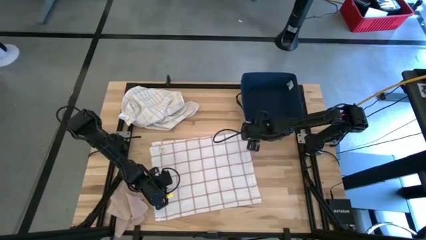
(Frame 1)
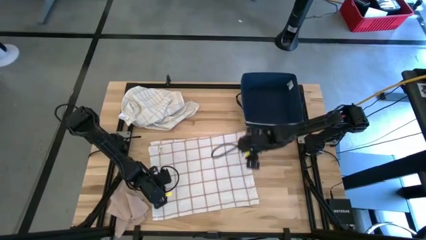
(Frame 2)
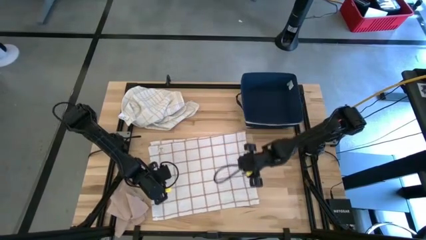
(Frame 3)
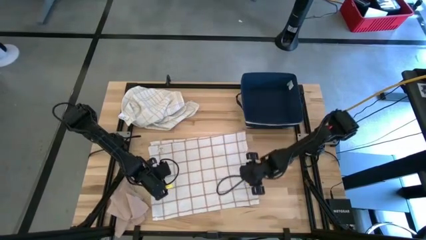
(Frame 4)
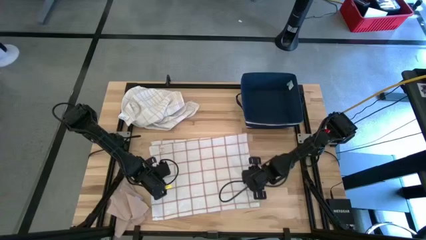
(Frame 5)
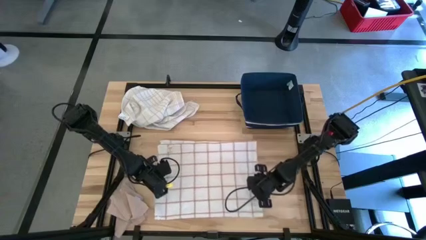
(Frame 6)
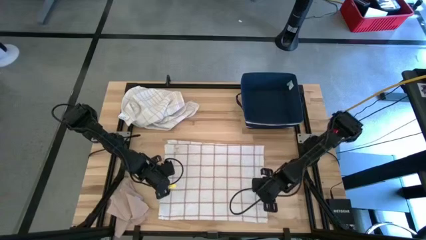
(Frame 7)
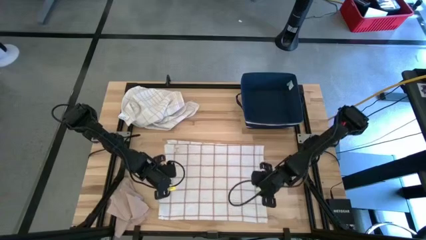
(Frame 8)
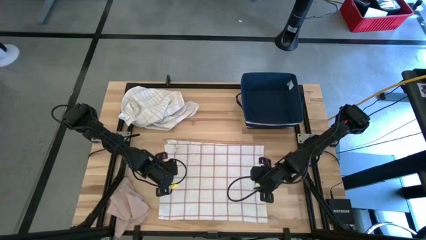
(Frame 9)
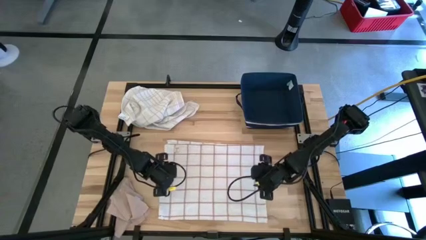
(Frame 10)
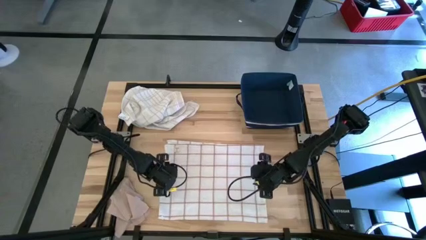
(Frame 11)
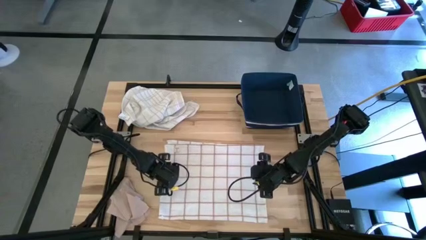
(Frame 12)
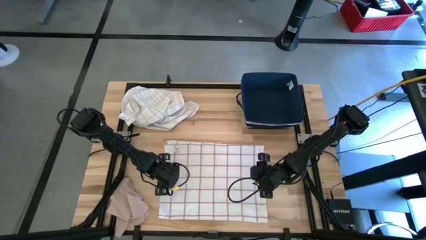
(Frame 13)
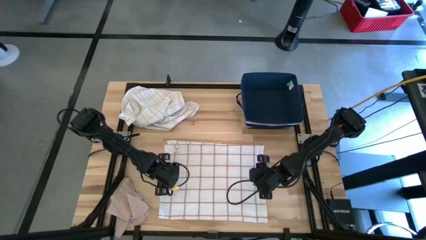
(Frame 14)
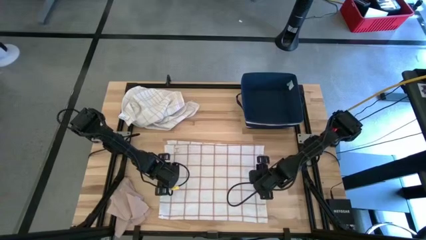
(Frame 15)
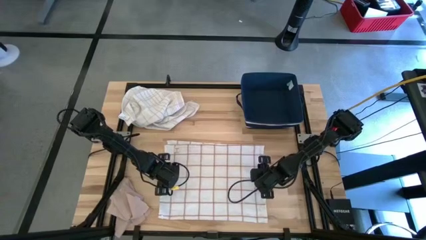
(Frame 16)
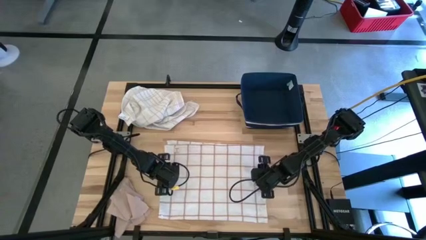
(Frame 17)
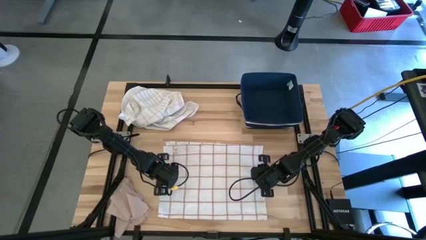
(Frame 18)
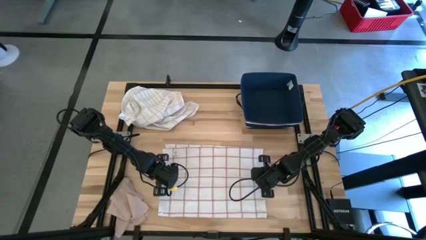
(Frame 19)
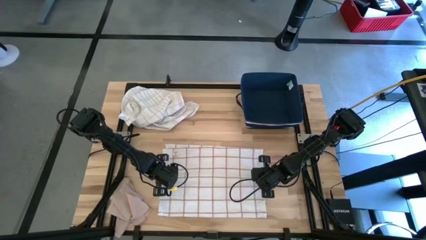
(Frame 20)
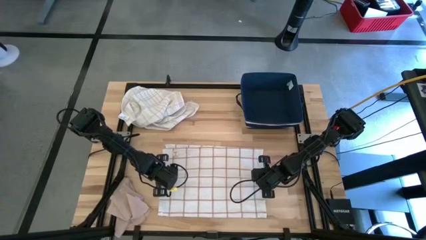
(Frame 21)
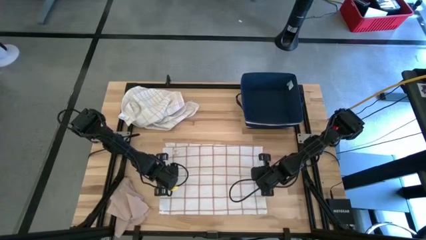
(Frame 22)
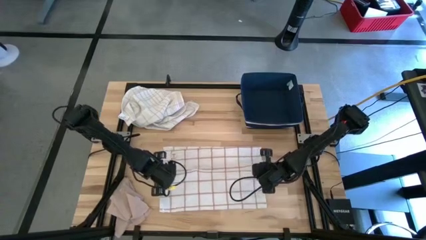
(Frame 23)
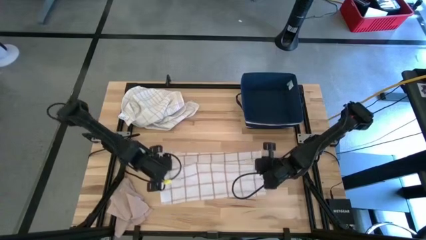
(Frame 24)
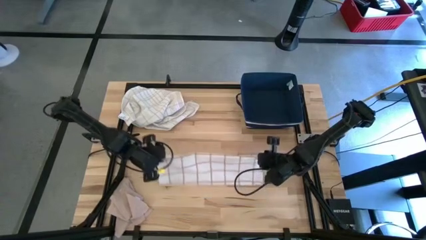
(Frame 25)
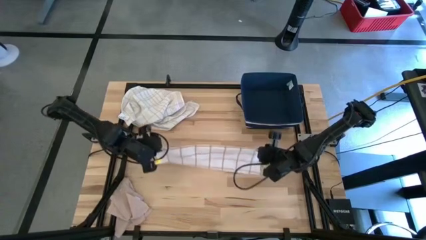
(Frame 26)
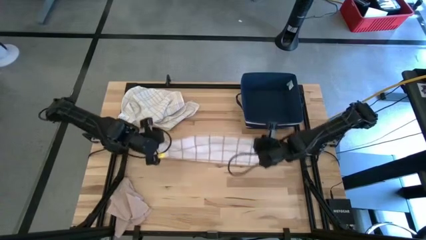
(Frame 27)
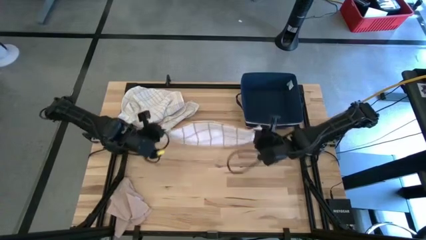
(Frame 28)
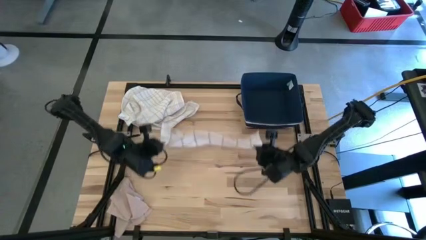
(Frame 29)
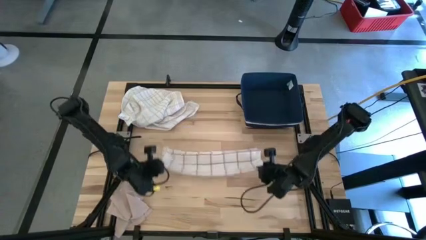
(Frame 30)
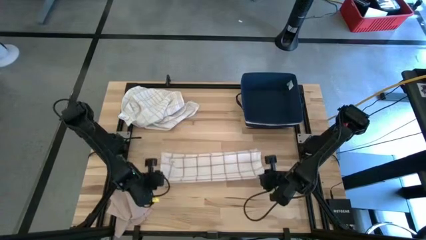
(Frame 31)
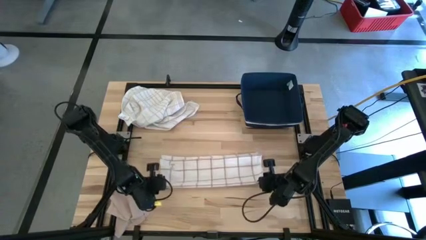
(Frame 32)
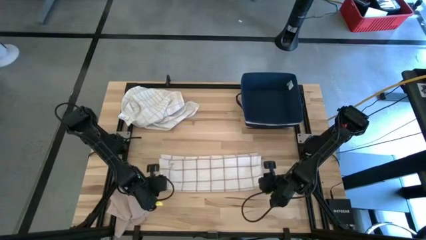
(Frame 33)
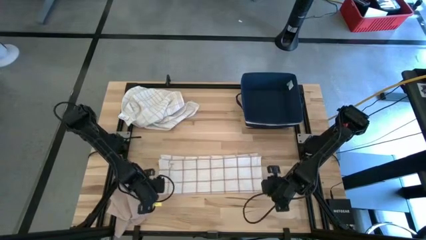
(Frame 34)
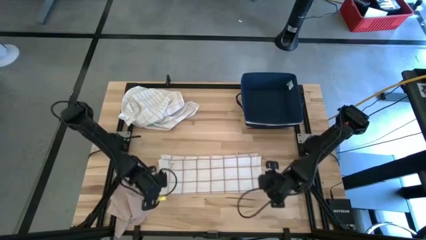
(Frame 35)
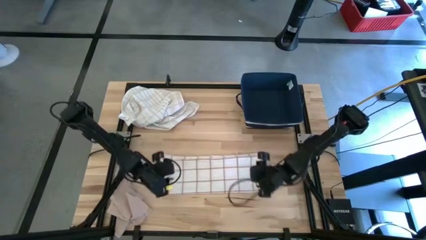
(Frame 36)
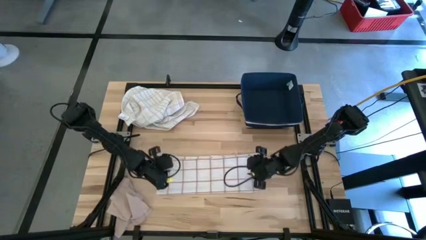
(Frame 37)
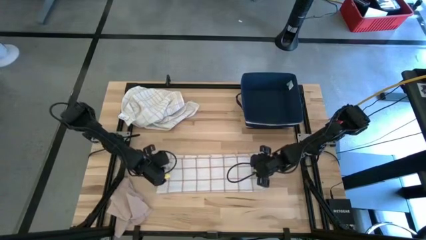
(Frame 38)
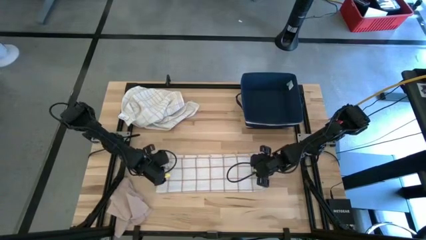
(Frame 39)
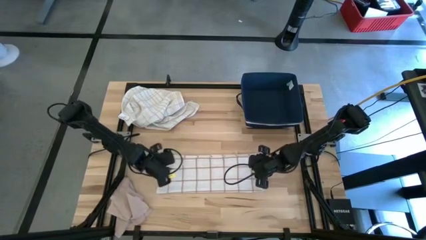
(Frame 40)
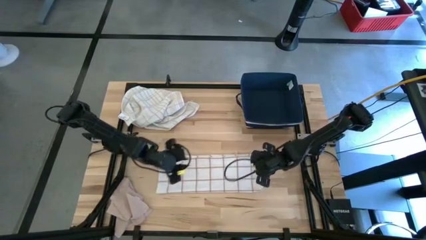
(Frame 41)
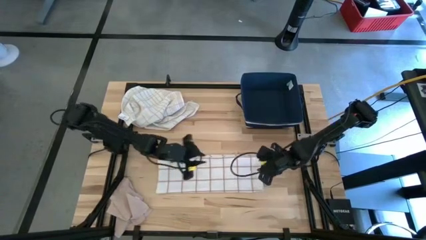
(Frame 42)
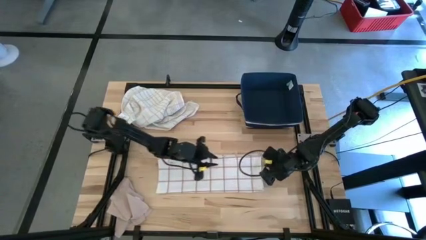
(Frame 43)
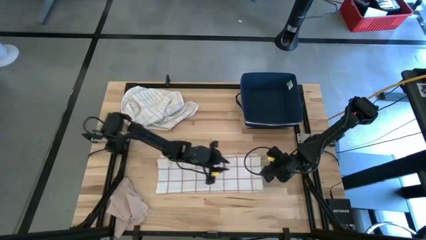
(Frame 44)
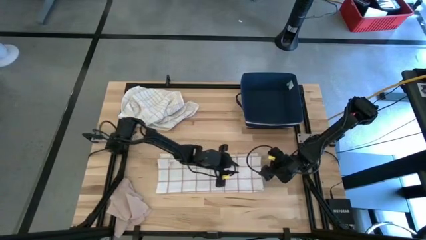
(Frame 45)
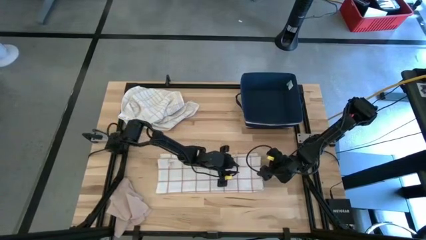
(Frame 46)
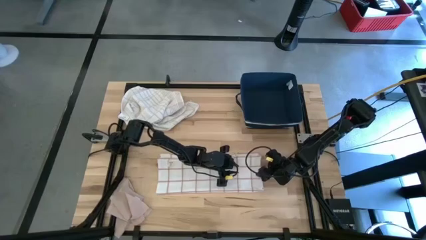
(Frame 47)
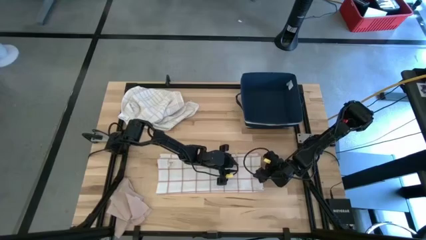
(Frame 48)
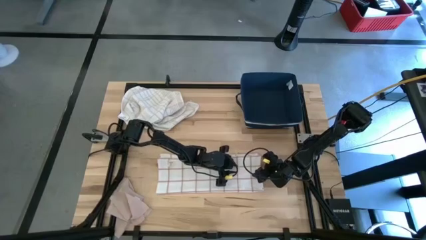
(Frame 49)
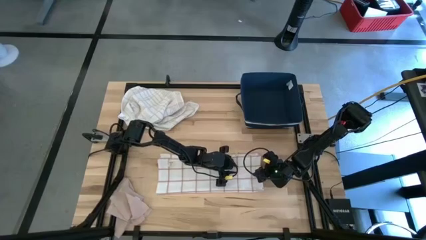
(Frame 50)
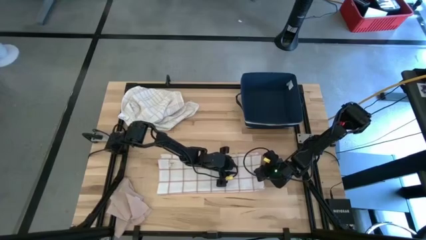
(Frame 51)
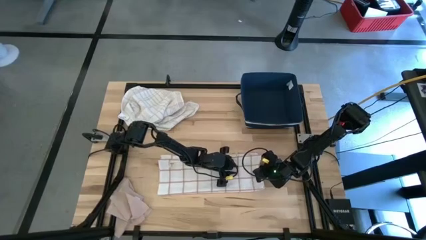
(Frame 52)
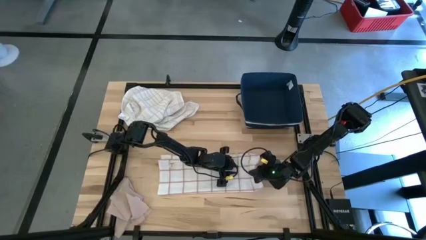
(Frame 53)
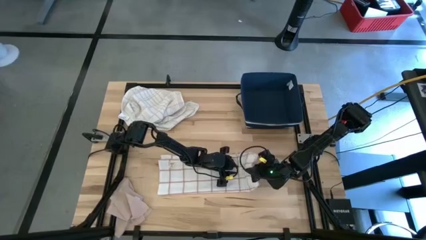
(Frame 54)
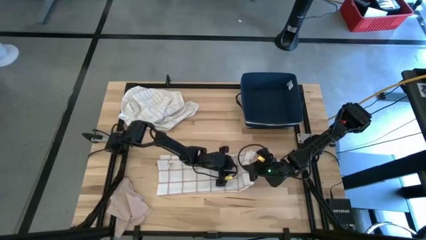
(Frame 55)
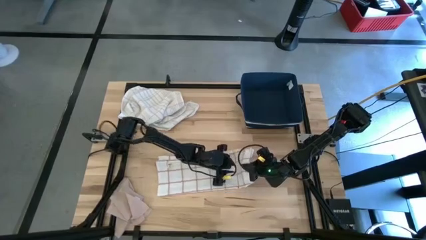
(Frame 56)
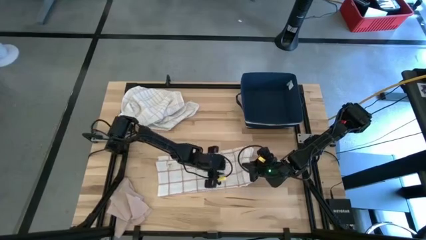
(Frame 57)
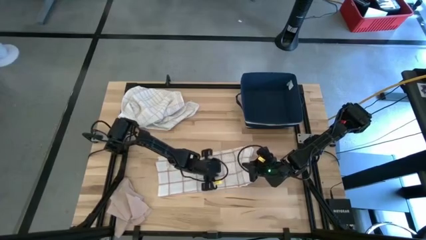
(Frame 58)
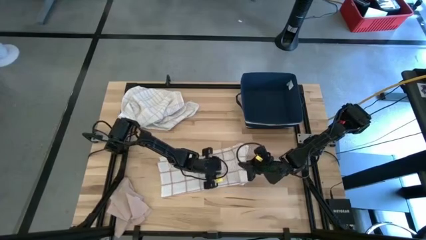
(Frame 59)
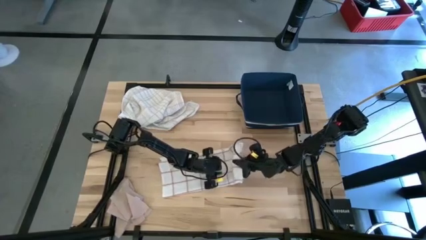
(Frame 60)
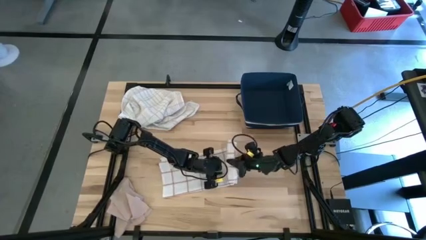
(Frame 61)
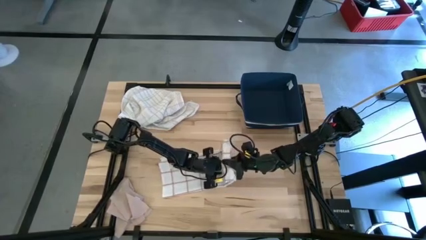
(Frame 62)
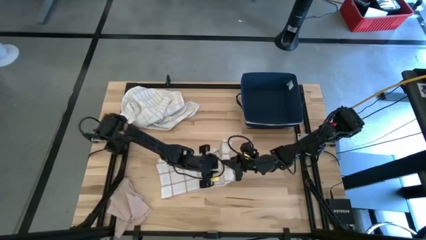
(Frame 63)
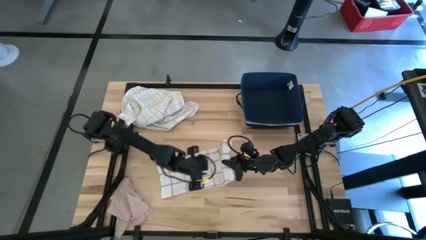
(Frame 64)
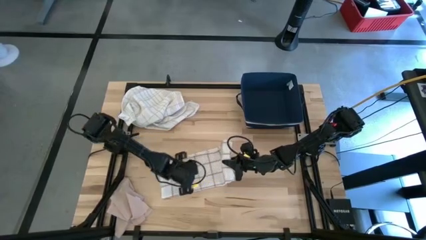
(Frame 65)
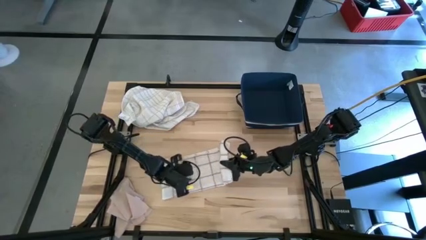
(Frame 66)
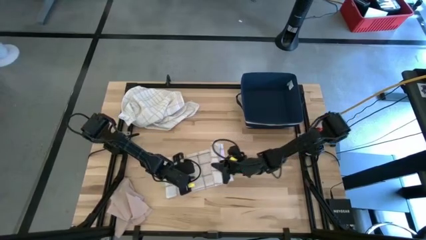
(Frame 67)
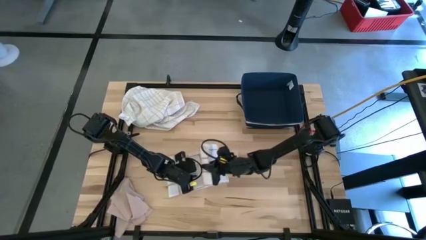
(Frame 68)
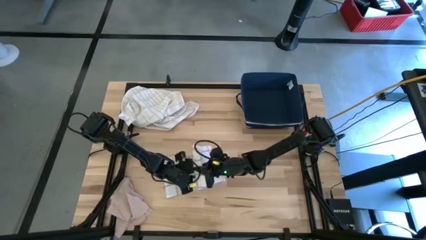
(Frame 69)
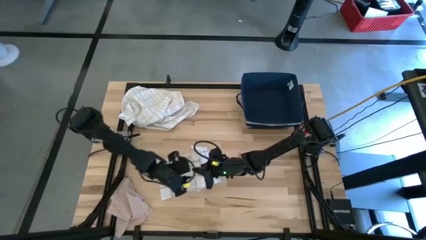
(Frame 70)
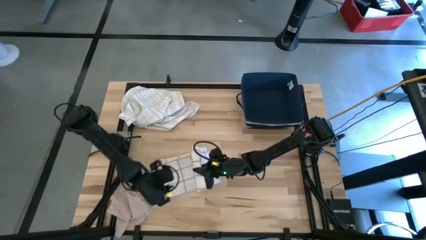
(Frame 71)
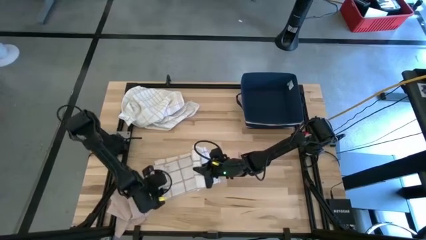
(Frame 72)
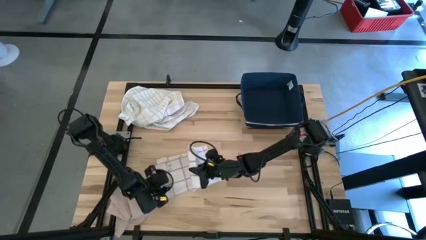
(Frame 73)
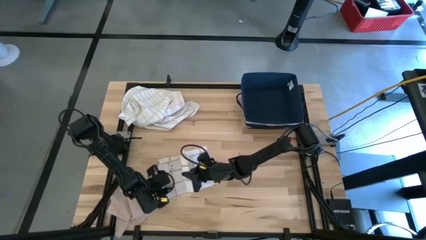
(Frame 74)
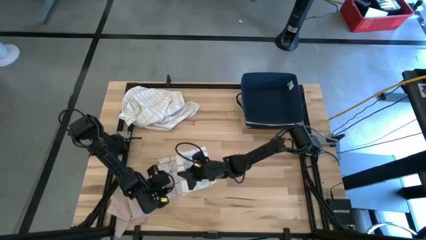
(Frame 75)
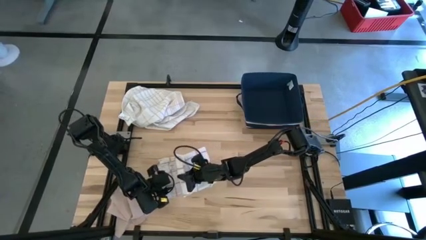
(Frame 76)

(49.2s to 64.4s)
Task: Fold towel
Fold the white patterned towel
